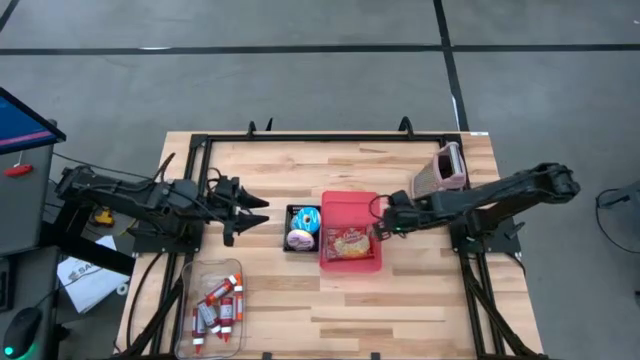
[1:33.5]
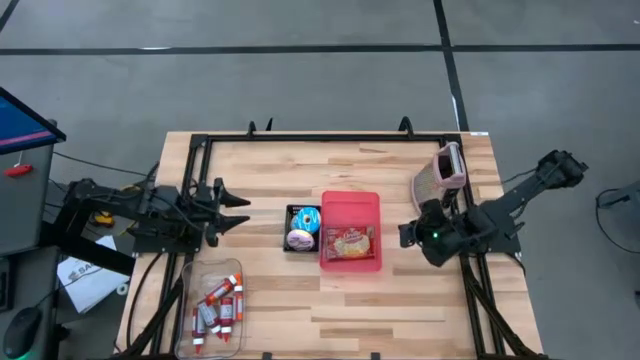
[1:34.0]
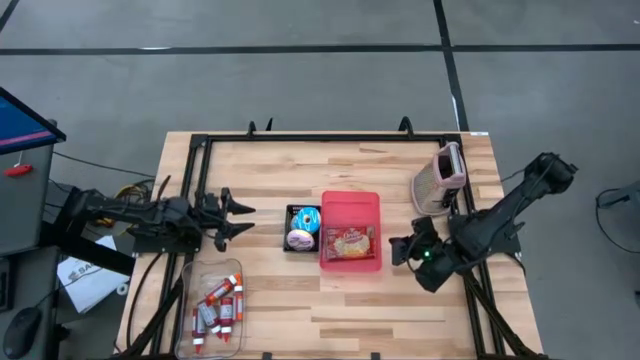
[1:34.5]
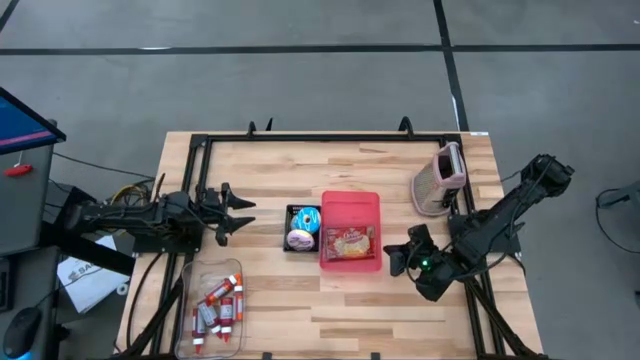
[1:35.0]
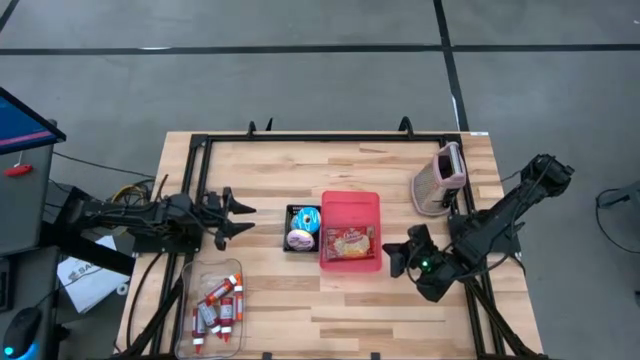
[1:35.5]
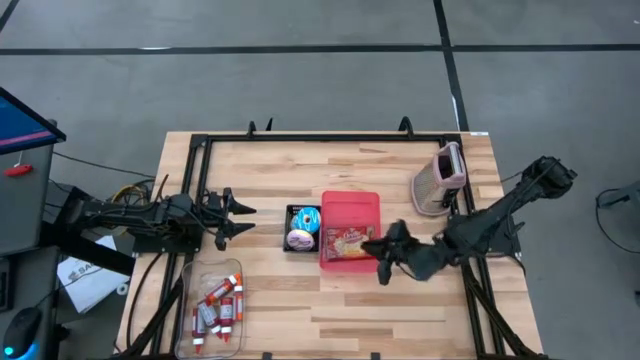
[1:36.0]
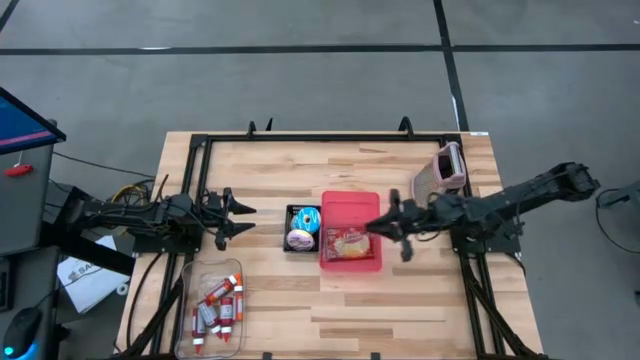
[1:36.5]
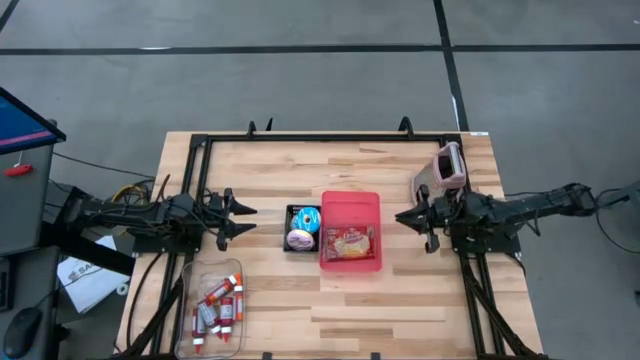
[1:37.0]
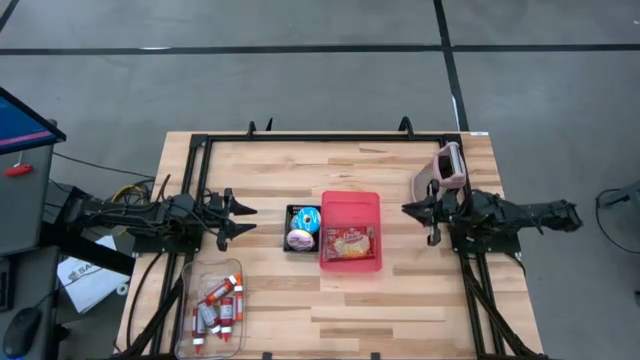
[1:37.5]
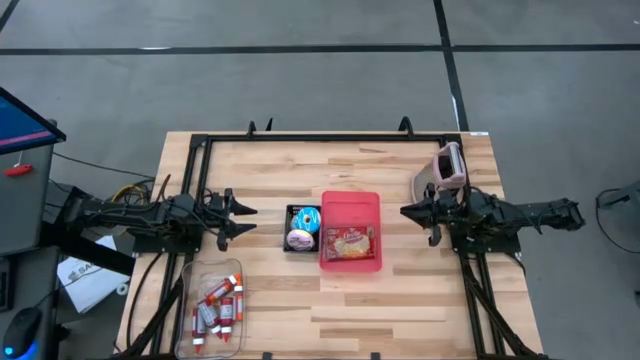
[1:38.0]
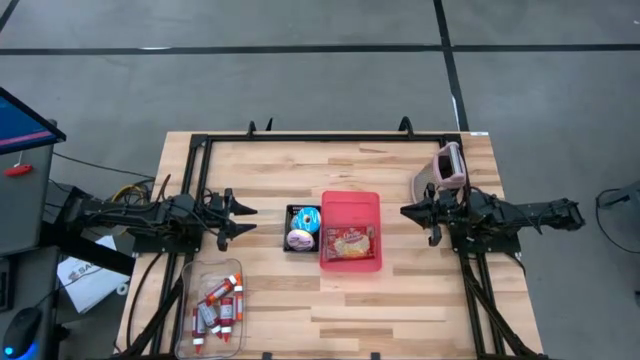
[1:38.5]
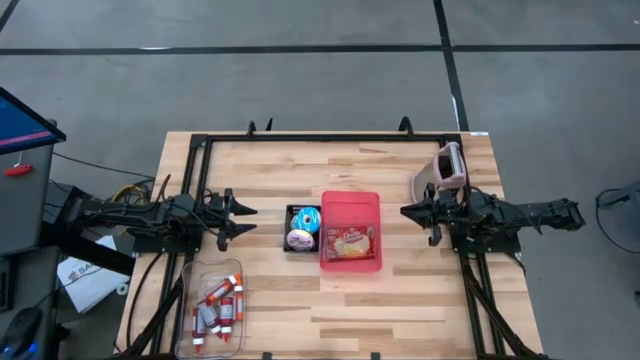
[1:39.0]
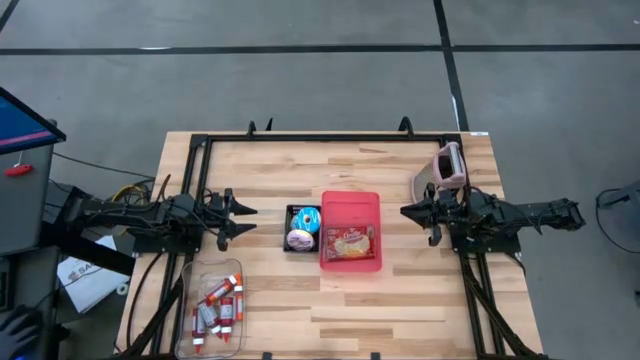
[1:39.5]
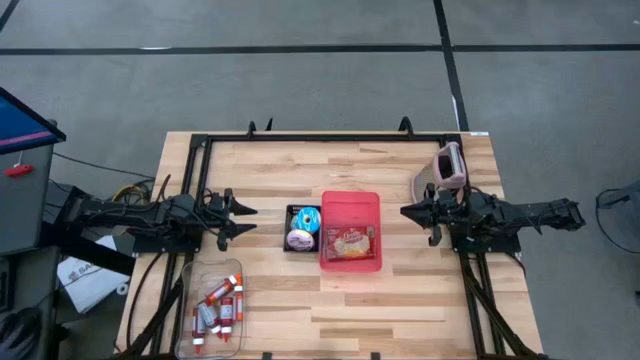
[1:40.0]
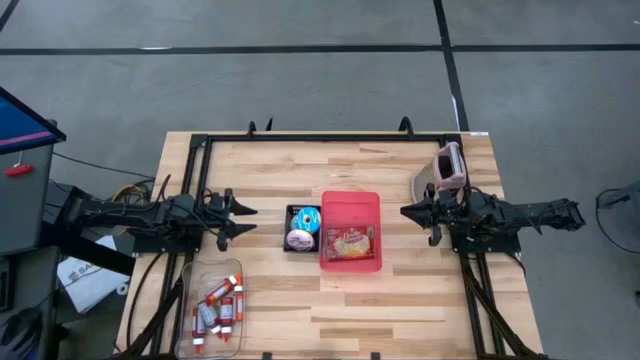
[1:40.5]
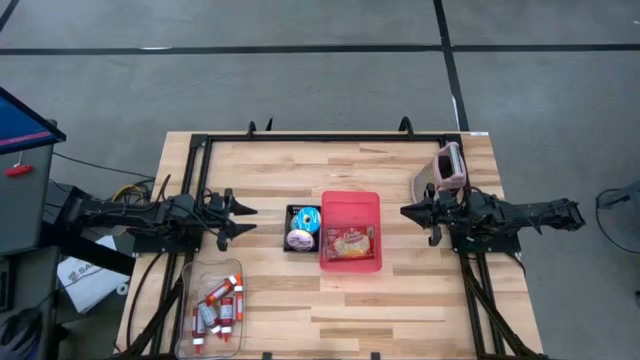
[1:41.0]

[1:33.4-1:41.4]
Return to Home Position

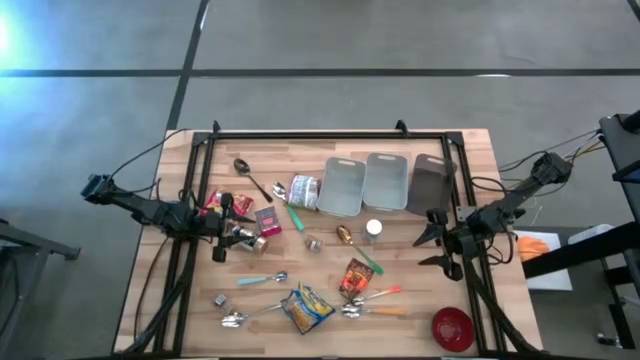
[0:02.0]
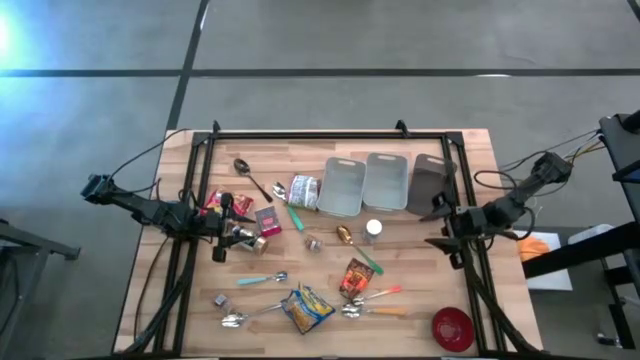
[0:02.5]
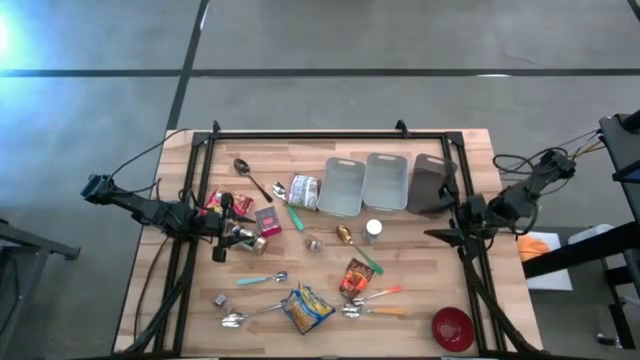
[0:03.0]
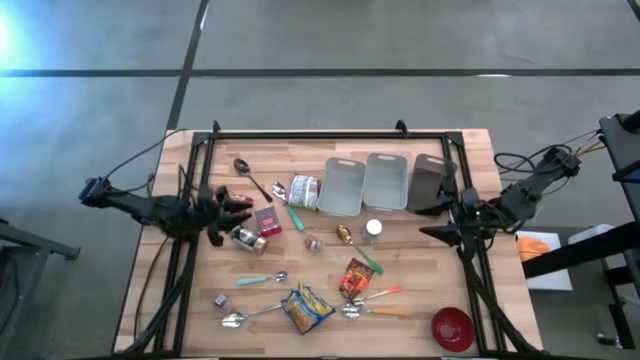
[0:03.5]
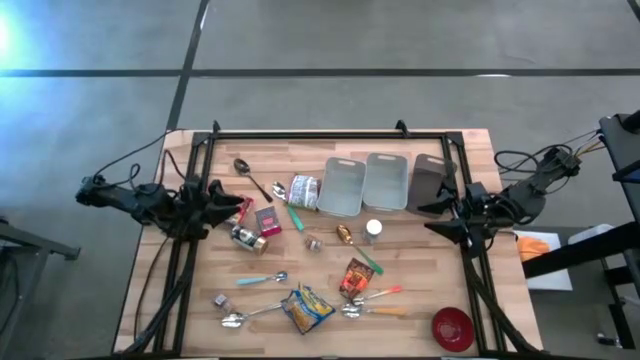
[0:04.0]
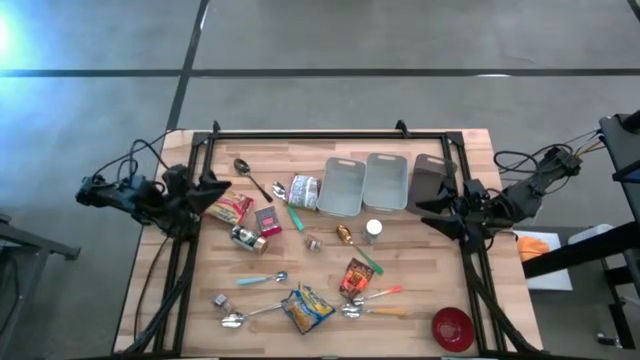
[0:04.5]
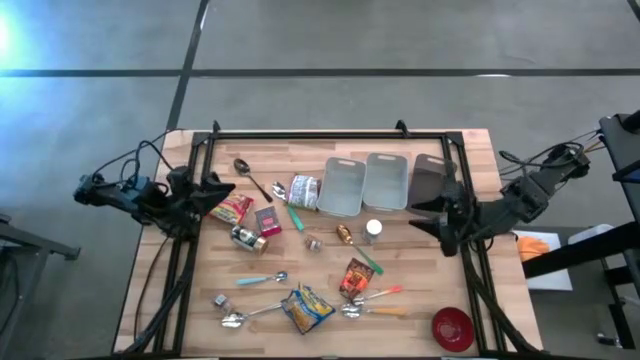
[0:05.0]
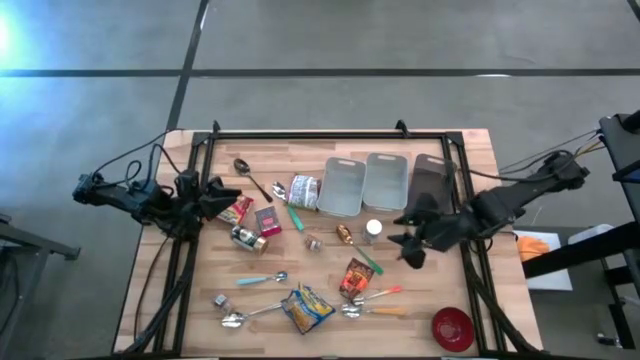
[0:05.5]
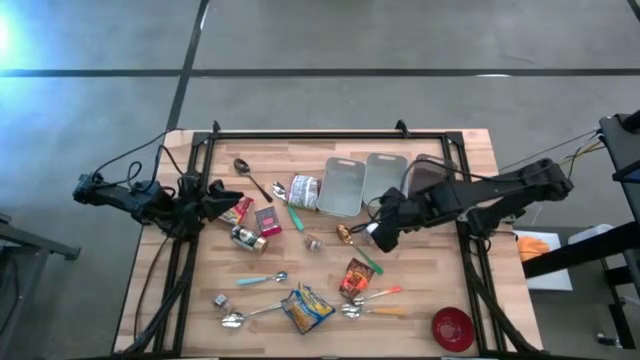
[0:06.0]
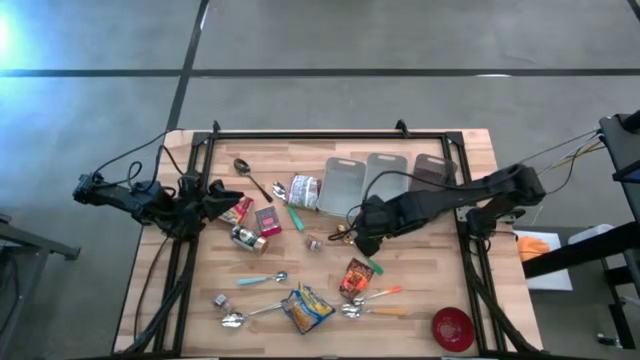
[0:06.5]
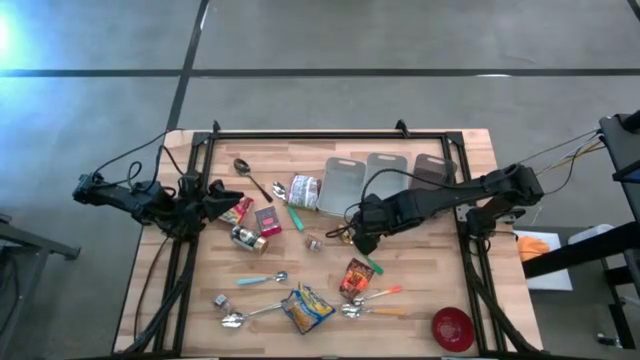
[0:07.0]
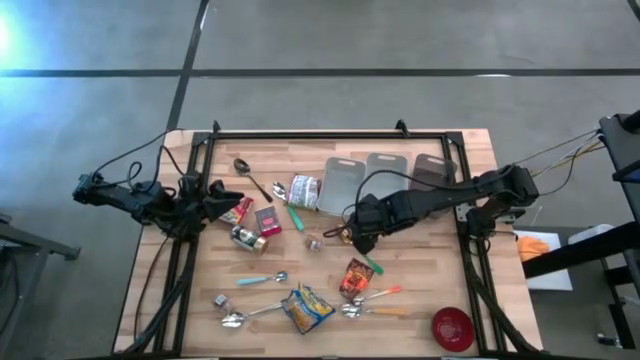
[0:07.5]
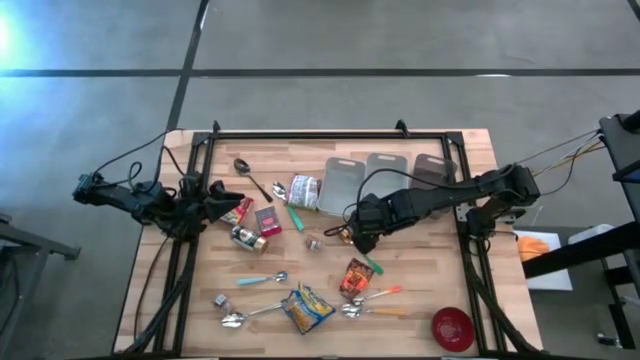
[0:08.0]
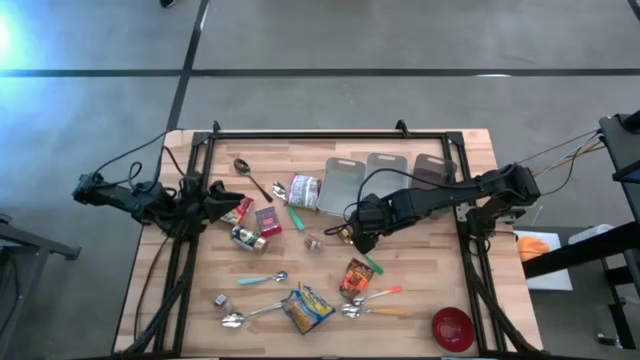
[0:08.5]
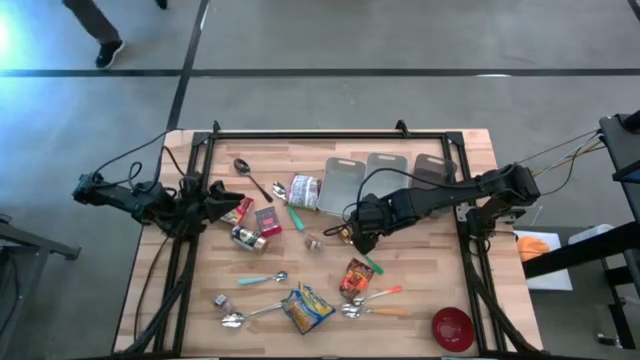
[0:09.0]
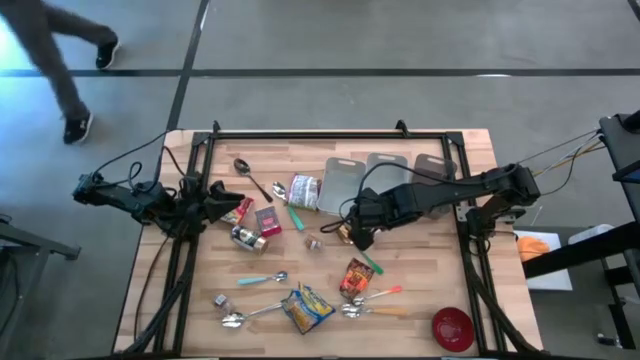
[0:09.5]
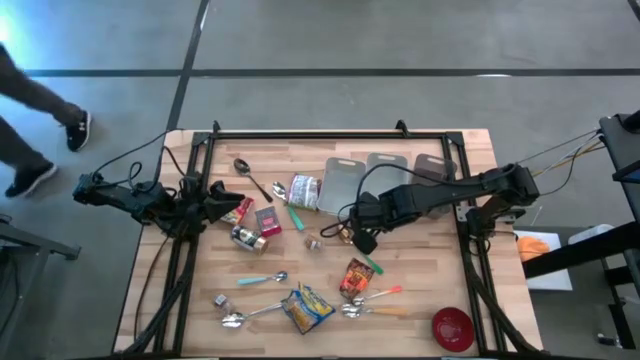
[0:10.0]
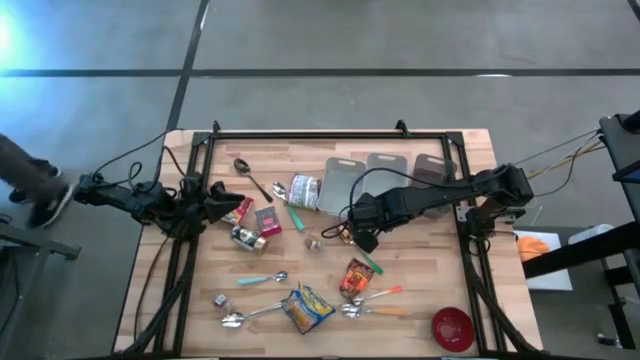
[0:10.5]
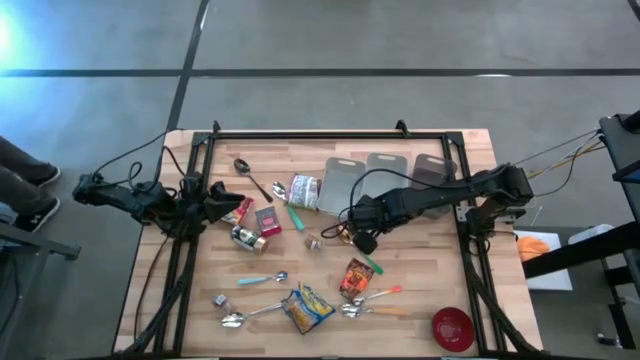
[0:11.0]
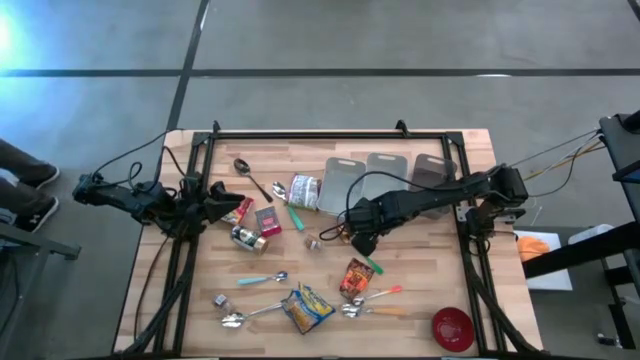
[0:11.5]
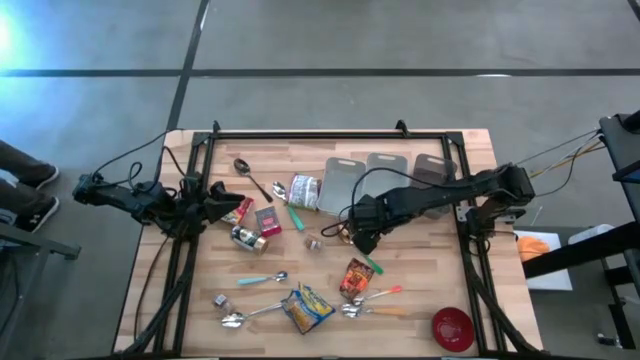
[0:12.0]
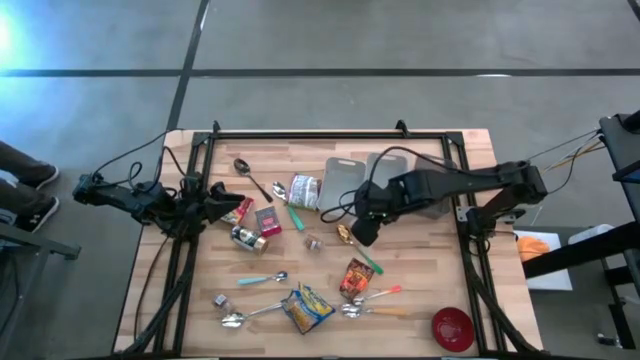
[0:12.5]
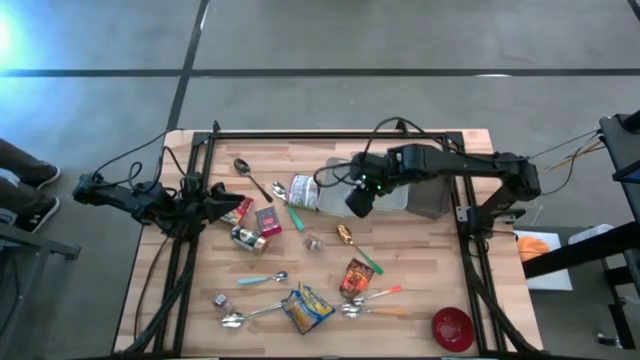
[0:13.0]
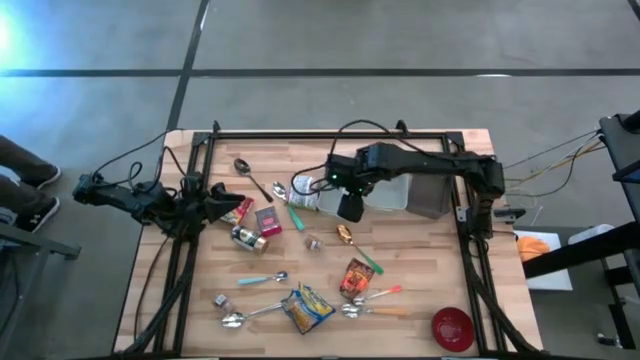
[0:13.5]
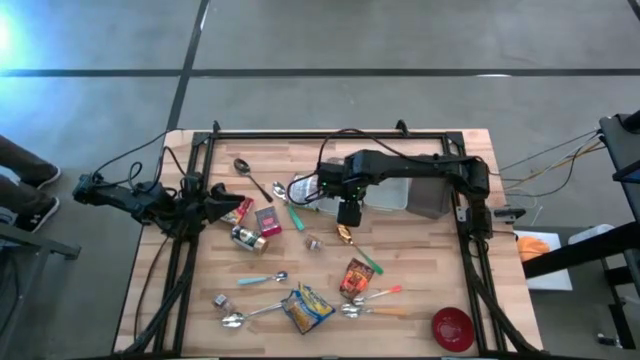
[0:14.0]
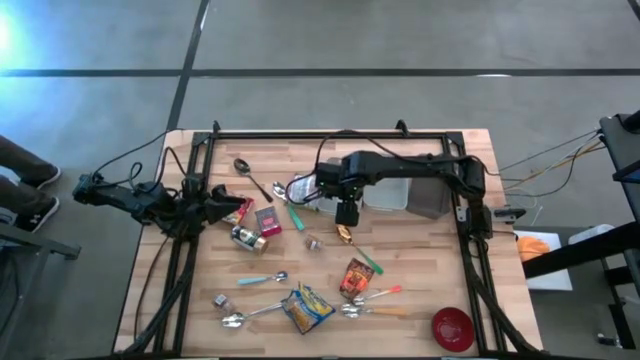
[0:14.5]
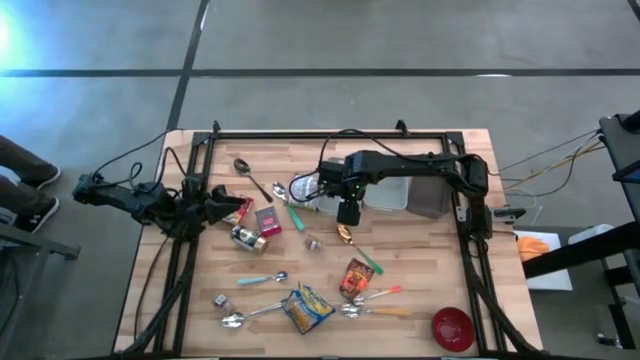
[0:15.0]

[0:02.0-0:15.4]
Put the white seasoning bottle into the left gray bin
